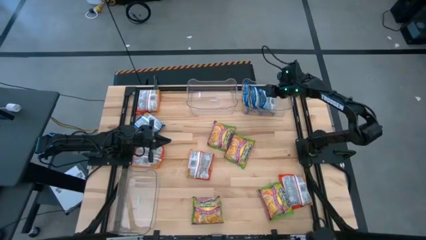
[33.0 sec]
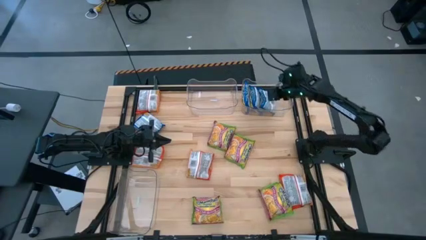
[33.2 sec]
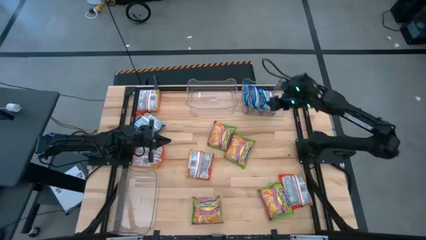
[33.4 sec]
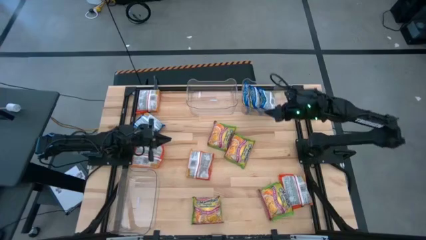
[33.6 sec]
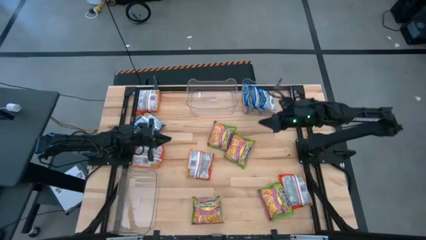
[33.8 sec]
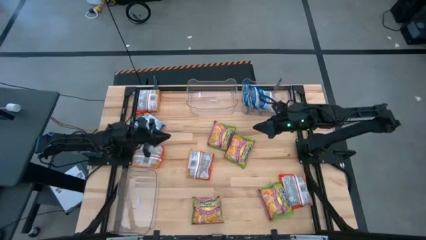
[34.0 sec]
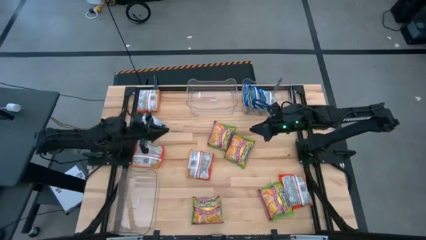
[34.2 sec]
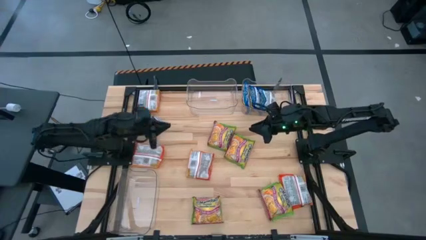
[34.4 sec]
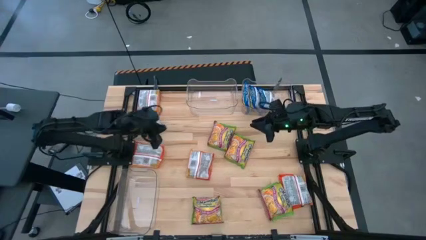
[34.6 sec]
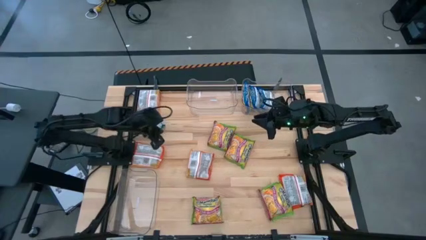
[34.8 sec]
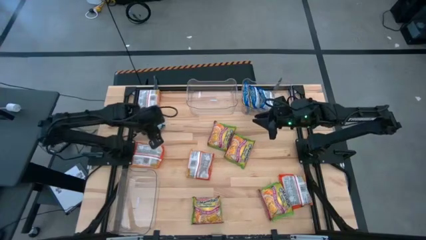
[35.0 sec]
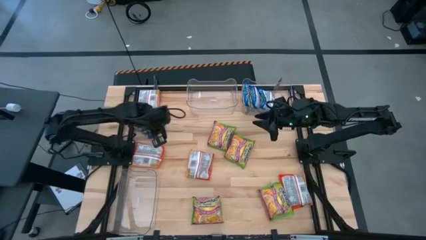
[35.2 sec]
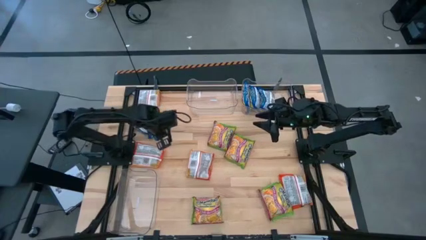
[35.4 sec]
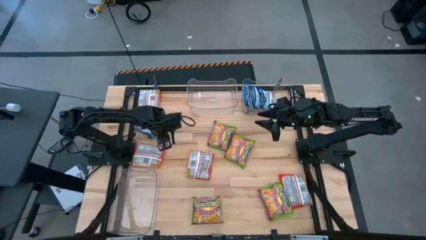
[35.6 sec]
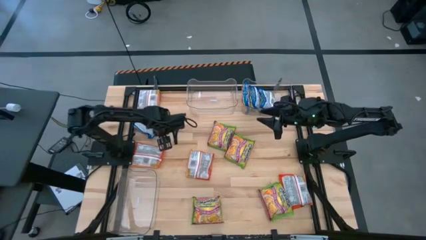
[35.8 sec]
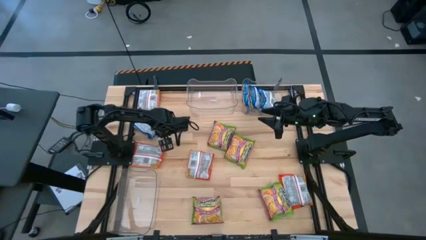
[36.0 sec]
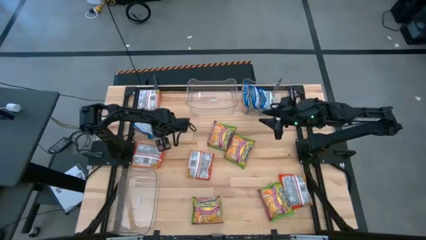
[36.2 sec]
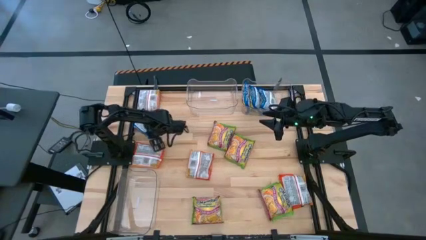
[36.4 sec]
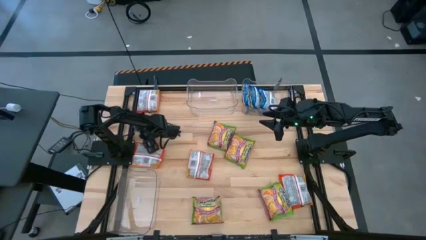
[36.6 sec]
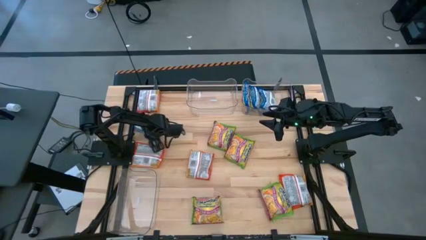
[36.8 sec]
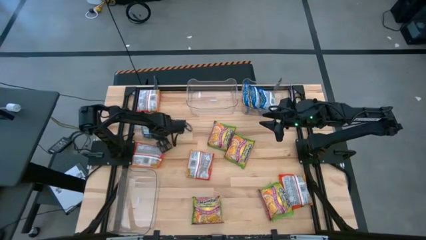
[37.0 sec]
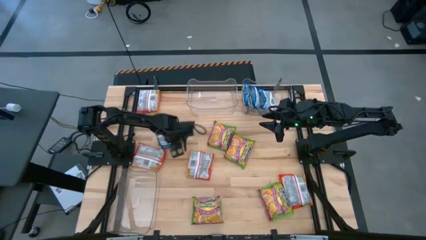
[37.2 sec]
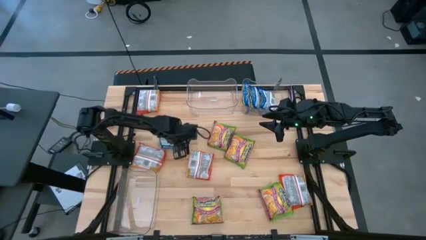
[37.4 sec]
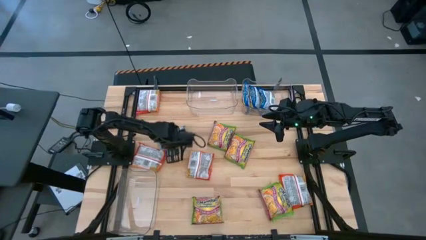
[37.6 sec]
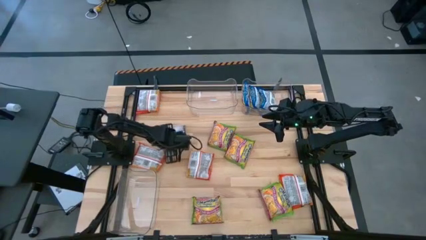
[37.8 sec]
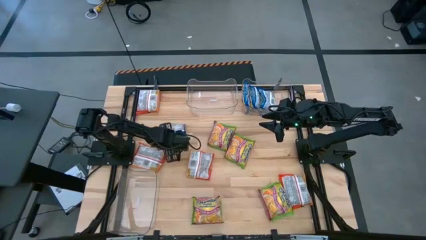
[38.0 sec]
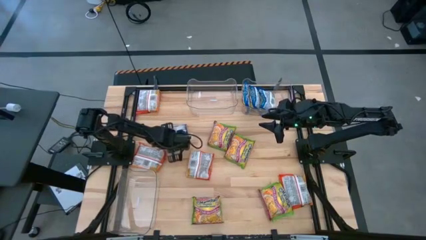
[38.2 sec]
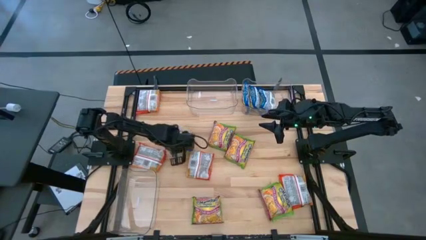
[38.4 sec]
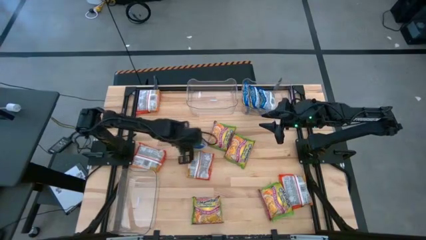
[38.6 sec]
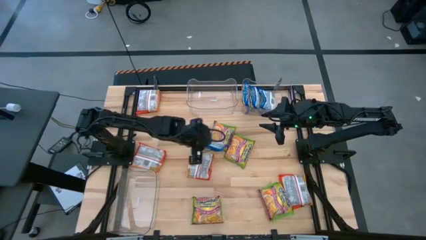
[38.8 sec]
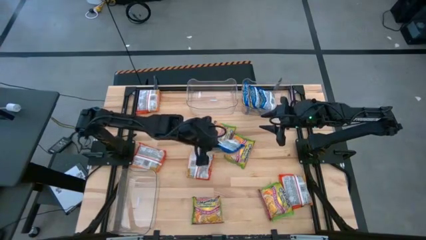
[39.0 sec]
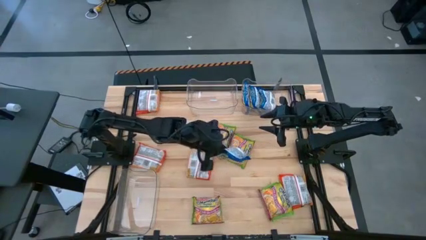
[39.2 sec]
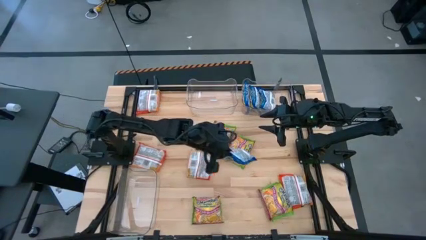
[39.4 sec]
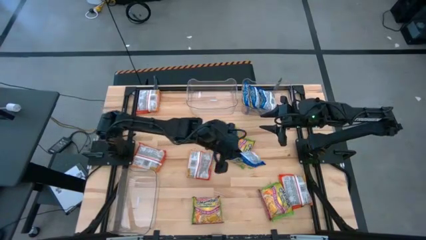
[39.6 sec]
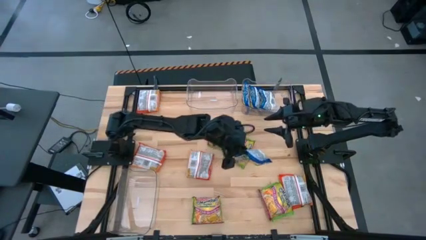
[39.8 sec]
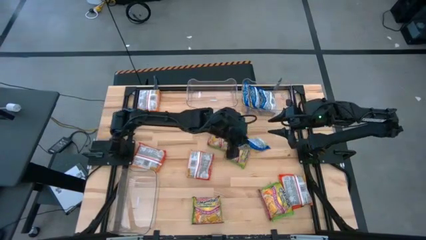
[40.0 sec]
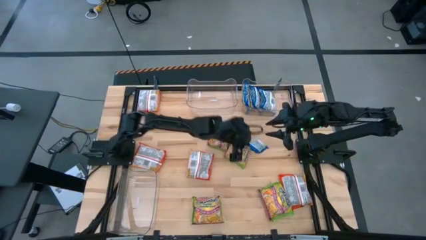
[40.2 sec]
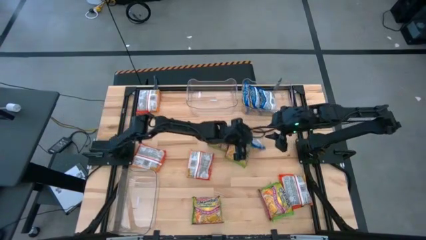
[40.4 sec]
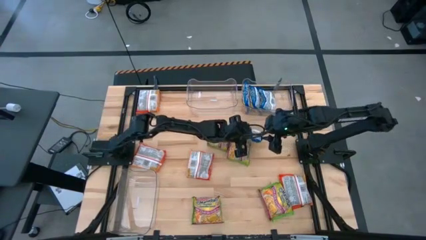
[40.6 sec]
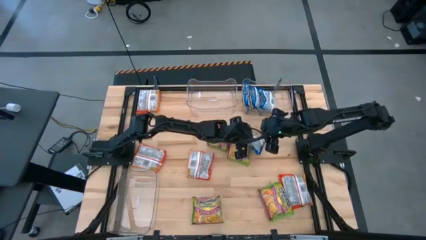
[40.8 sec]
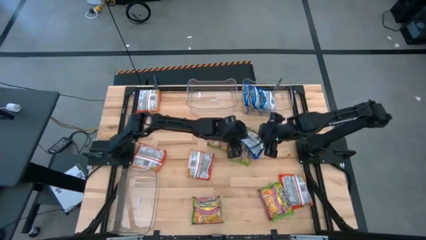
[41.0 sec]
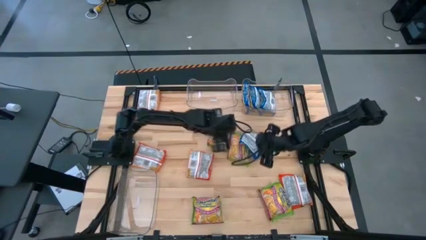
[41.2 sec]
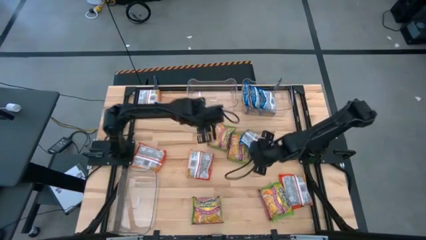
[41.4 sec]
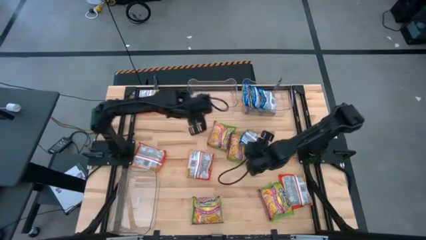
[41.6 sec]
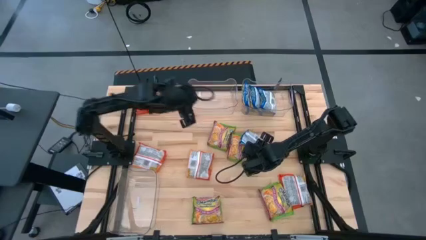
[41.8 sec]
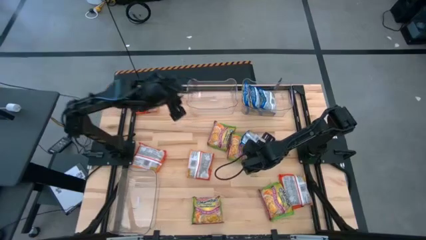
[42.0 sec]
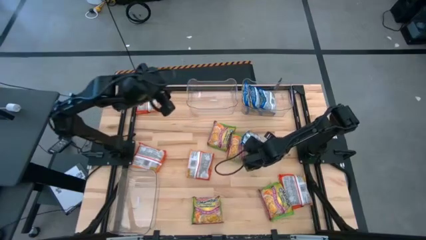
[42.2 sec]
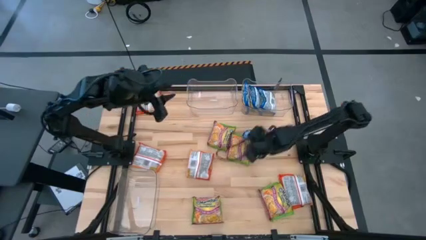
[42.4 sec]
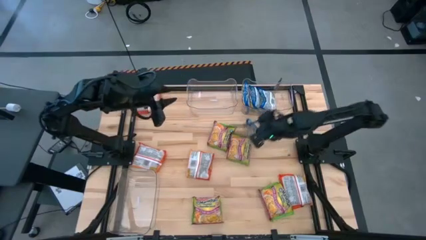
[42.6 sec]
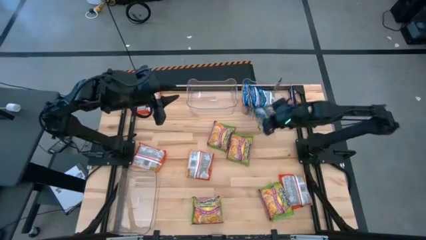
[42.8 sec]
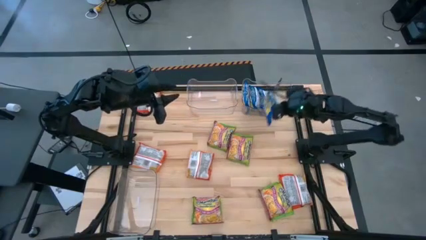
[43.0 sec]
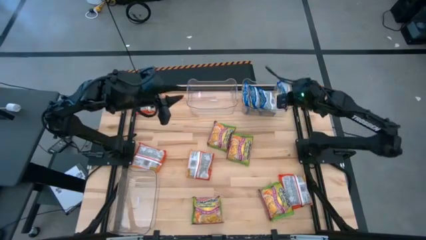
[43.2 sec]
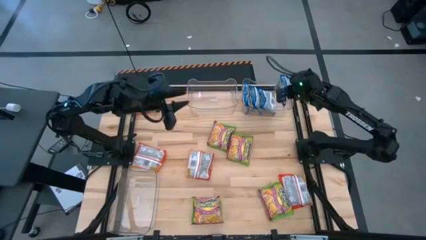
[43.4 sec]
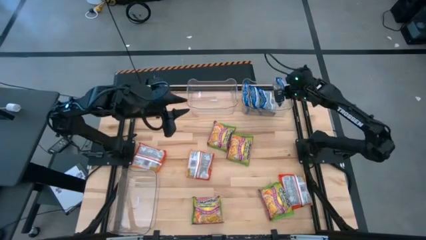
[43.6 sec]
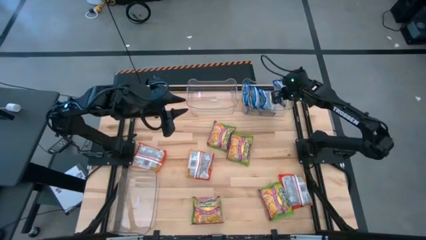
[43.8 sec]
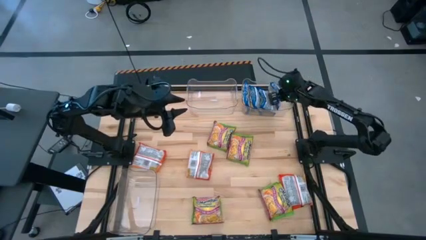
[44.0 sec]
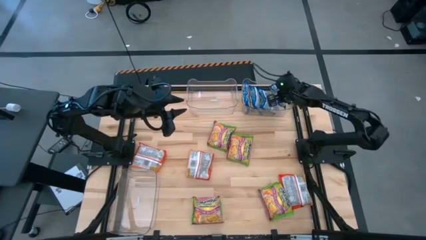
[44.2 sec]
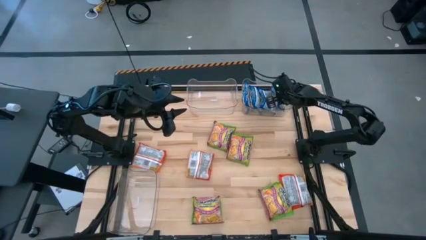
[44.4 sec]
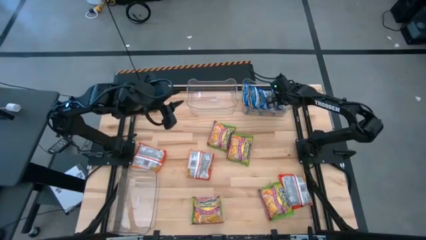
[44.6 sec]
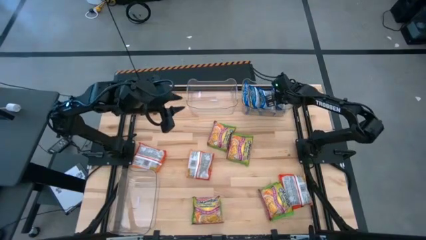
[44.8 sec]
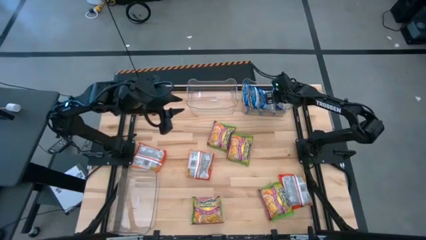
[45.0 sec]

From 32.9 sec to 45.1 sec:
Task: Sort Maruchan noodles
Put the blue noodle pack into the top right transparent bin
